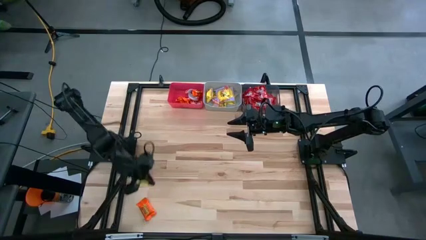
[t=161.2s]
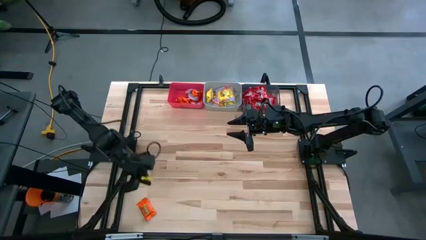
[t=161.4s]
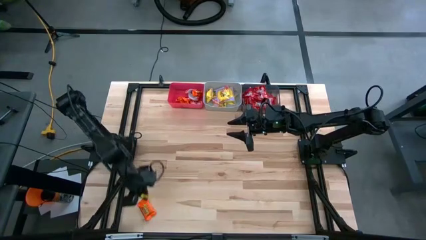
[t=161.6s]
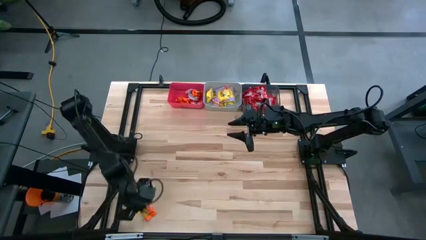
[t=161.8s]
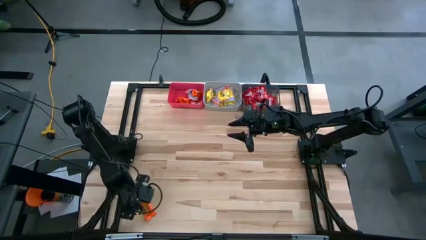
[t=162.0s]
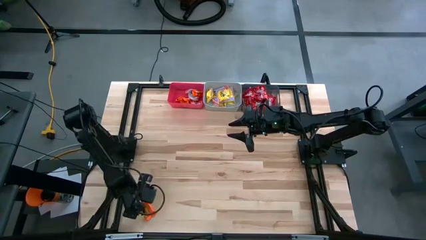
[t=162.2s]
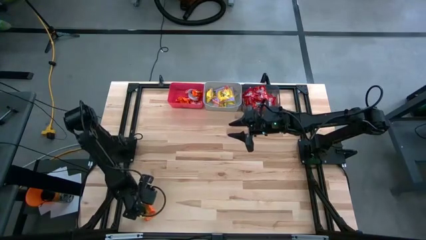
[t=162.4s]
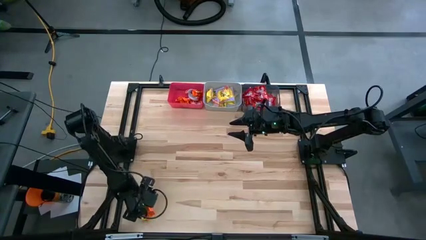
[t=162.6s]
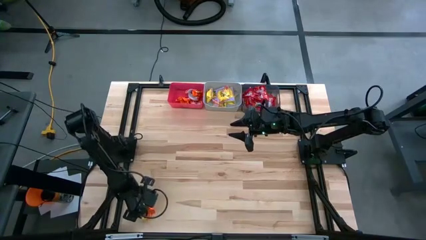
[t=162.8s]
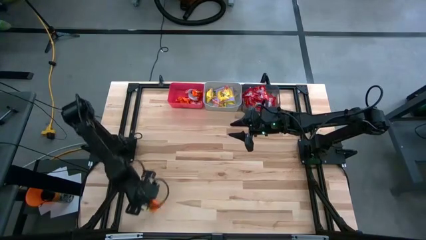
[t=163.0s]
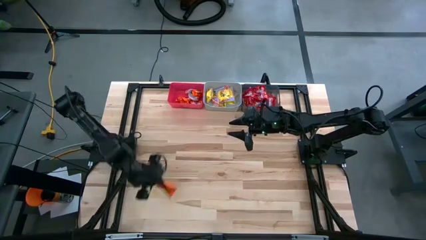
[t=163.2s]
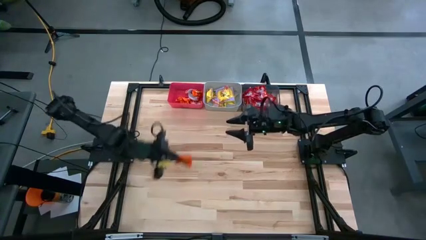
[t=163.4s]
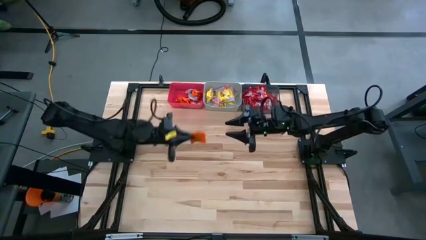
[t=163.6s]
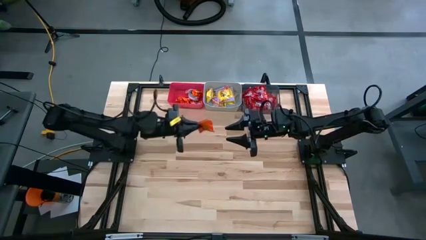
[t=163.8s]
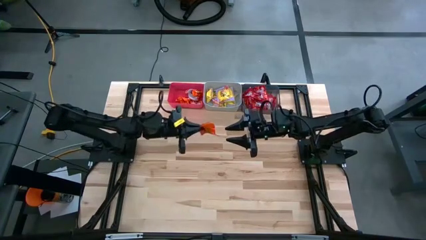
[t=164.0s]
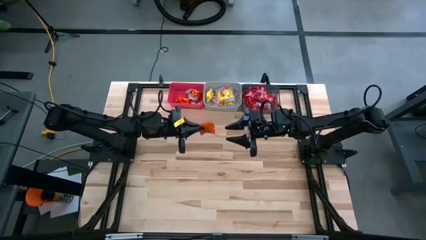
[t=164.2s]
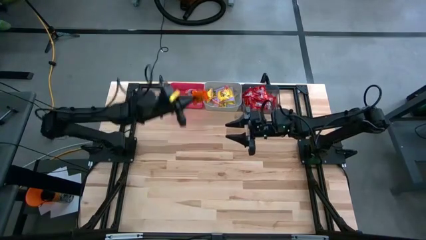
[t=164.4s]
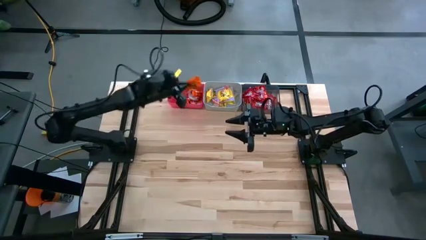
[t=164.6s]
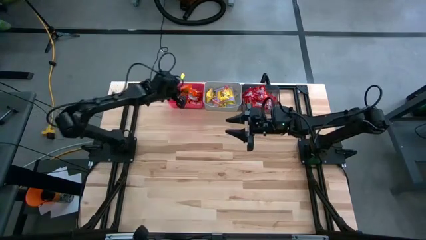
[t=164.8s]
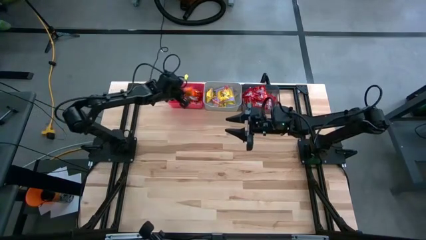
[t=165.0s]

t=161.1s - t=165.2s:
Task: Sort candy
Put the orange candy into the red bin

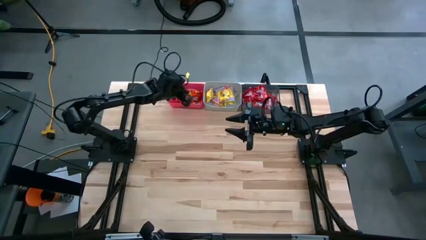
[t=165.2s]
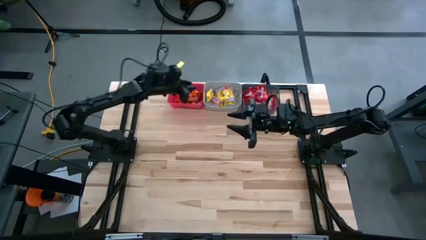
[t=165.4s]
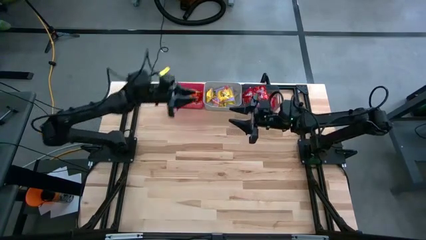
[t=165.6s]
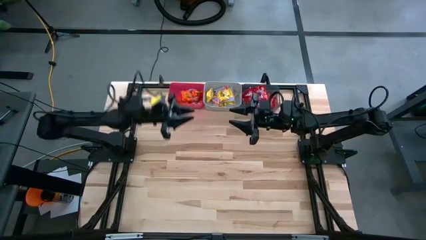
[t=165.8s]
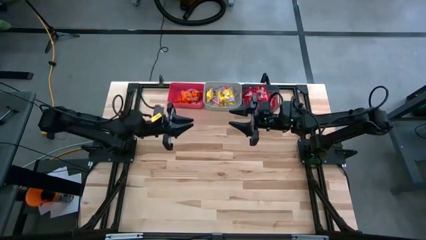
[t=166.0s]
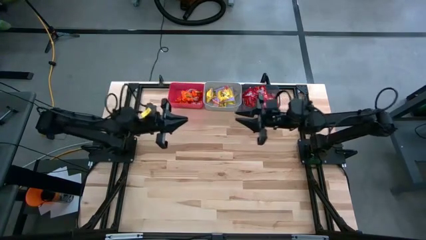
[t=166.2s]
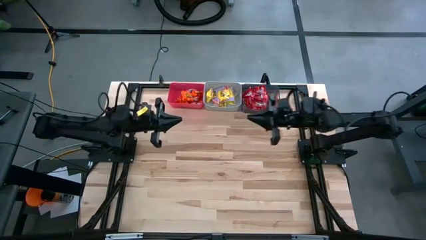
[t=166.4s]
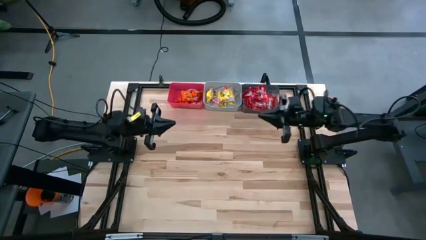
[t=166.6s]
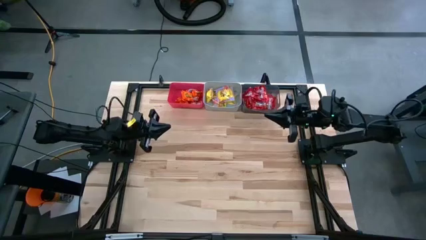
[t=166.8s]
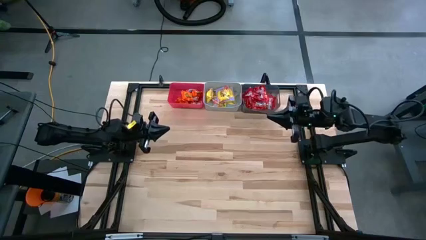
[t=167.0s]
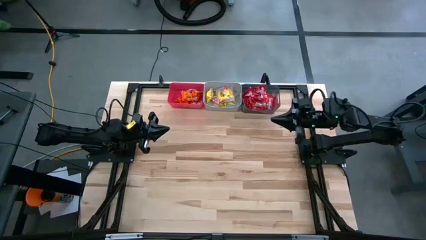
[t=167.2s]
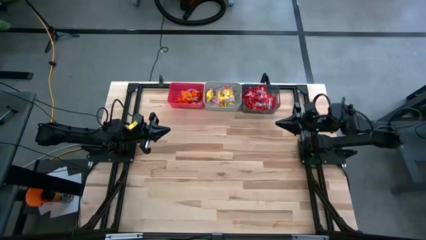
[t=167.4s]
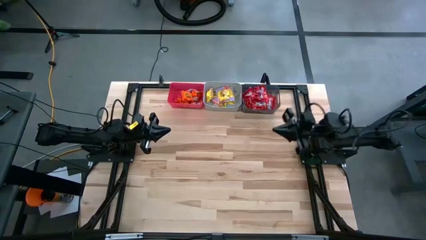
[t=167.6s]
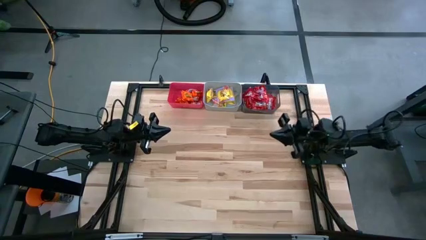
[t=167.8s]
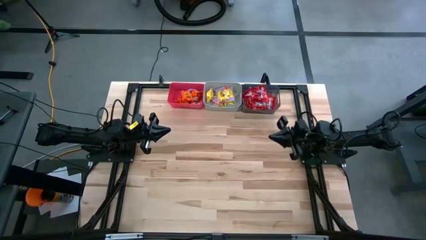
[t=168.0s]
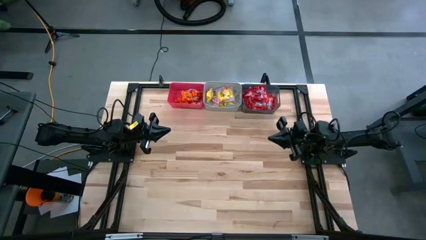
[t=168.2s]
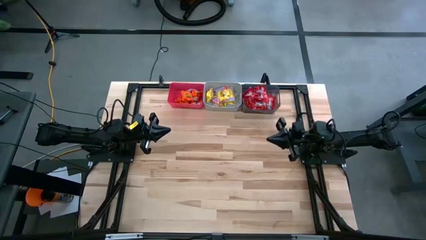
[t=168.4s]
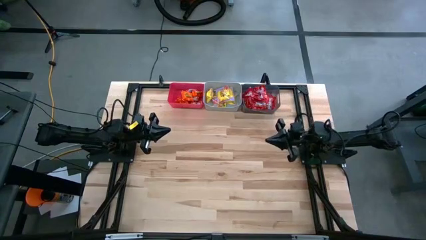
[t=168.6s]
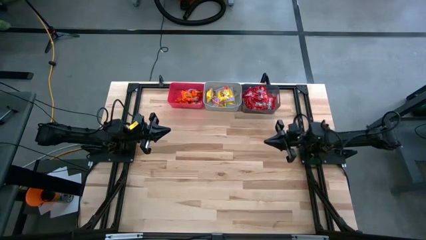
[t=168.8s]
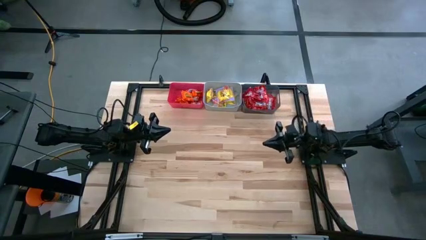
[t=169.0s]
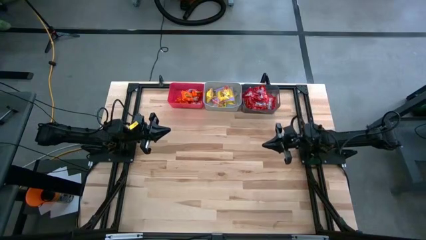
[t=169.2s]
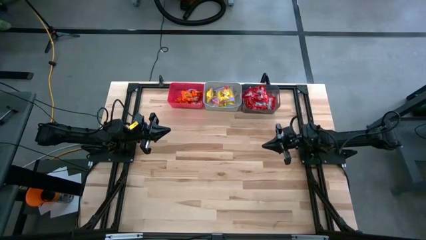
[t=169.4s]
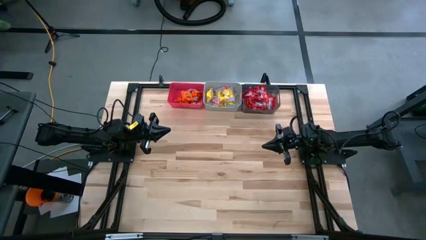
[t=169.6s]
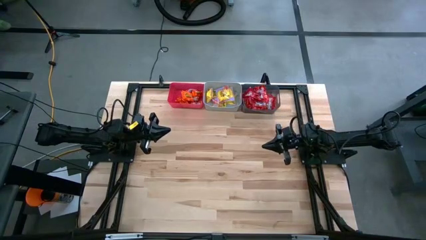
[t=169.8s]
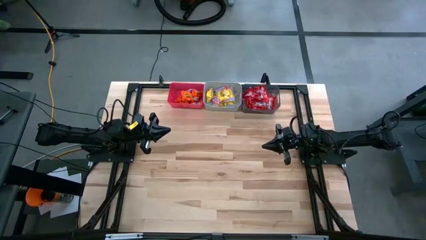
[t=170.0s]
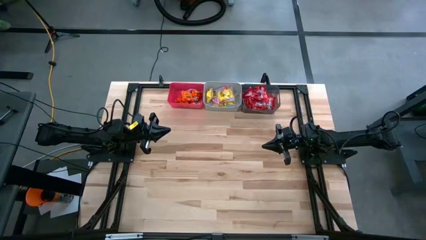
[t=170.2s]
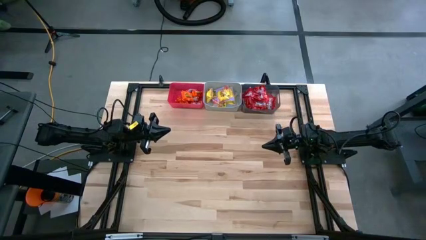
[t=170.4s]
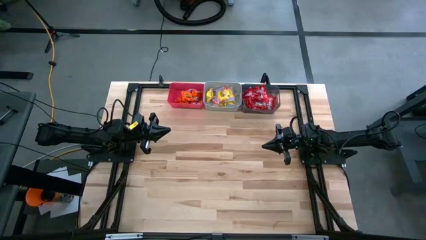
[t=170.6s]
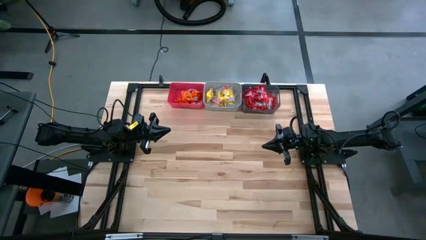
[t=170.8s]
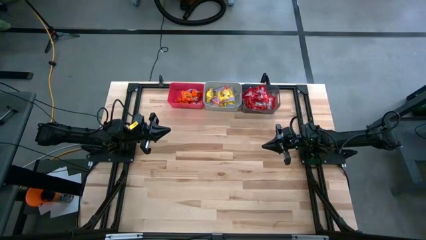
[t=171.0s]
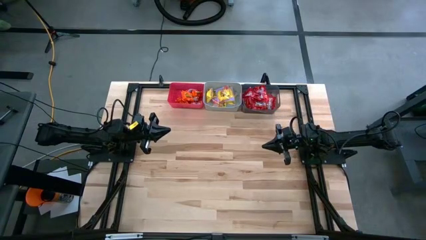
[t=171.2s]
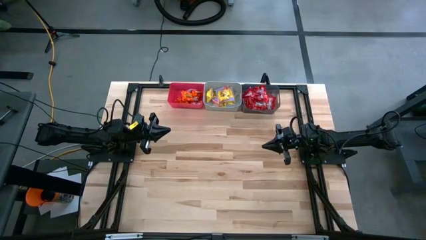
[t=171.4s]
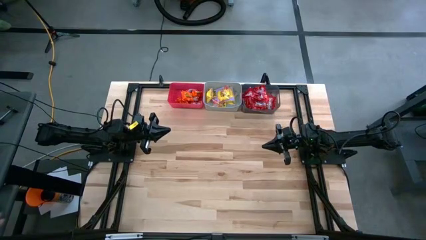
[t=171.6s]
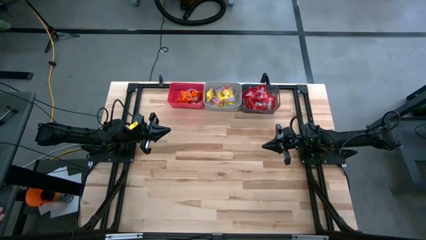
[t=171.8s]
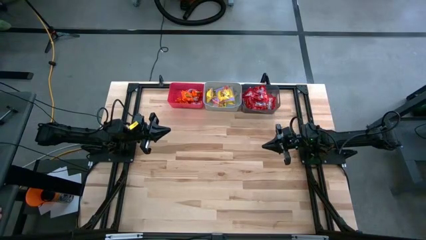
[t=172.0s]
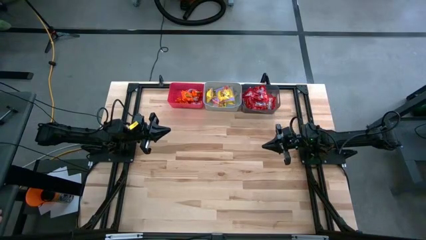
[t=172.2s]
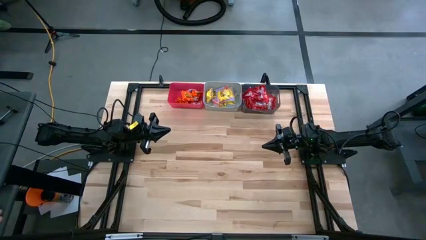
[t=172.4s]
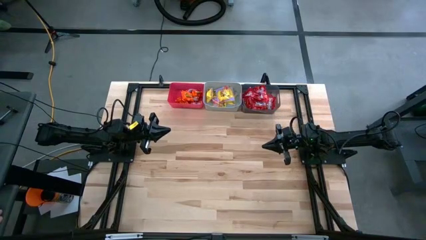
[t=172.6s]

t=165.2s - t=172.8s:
Return to Home Position

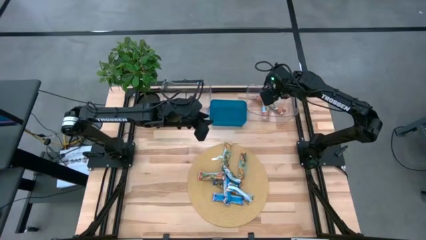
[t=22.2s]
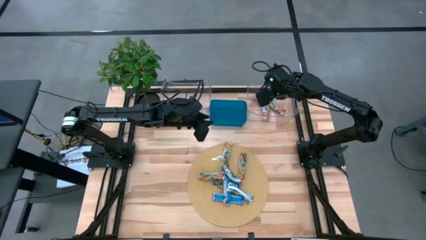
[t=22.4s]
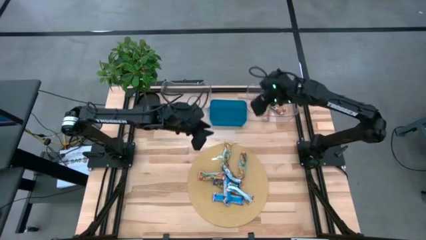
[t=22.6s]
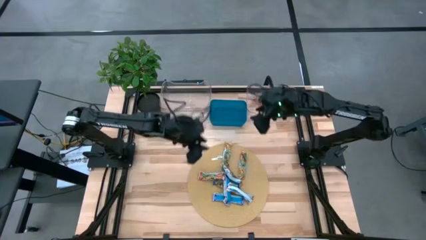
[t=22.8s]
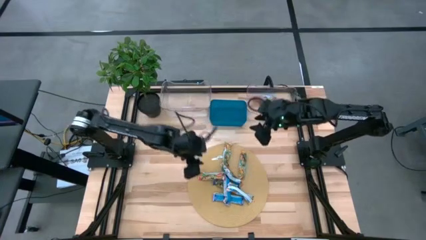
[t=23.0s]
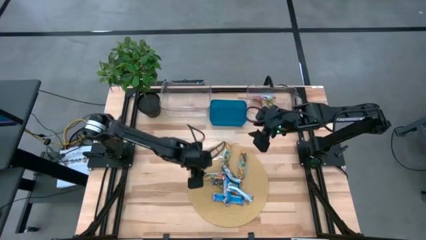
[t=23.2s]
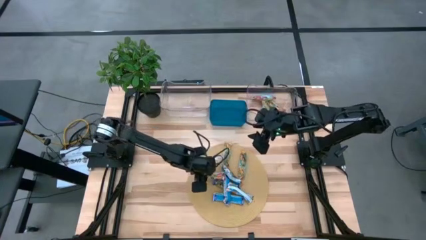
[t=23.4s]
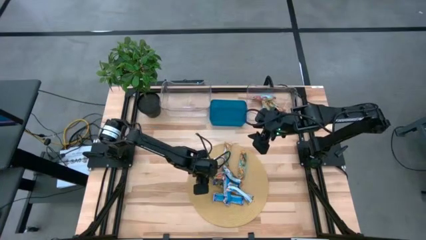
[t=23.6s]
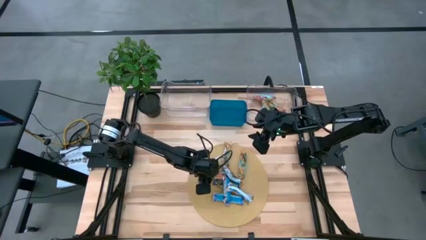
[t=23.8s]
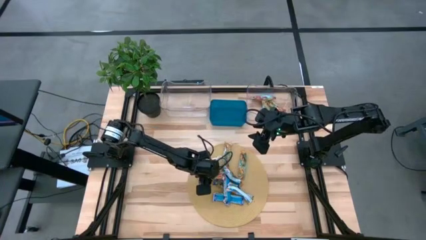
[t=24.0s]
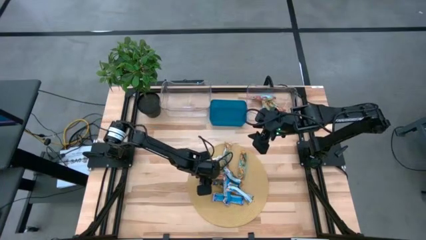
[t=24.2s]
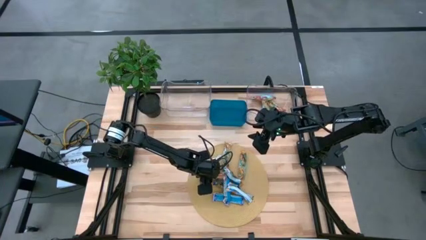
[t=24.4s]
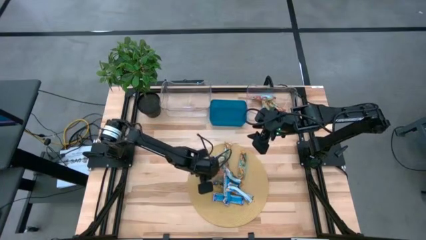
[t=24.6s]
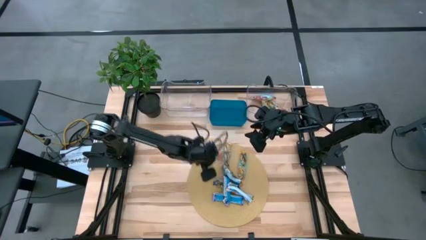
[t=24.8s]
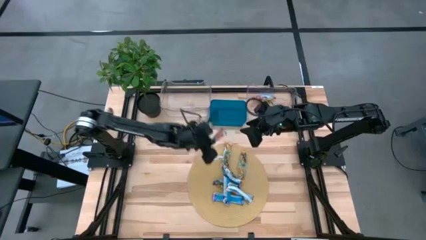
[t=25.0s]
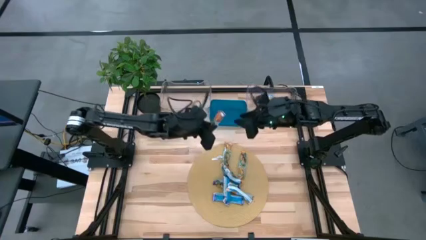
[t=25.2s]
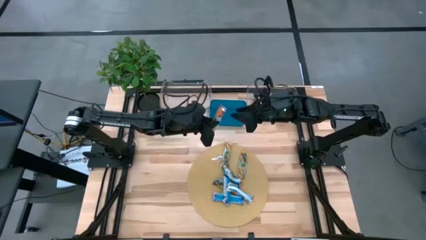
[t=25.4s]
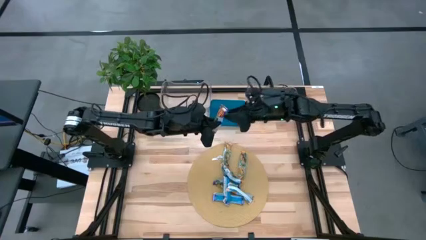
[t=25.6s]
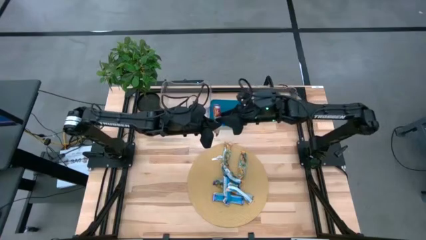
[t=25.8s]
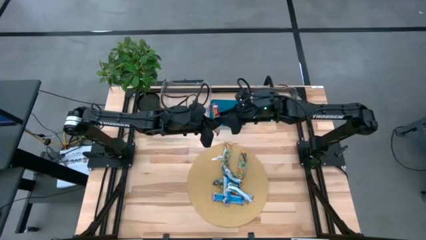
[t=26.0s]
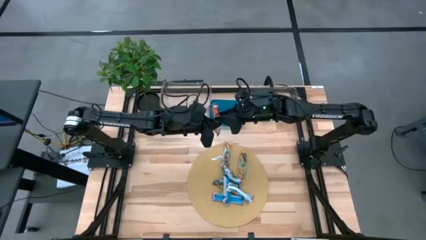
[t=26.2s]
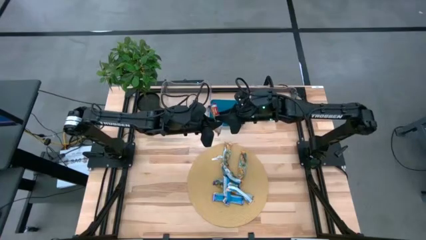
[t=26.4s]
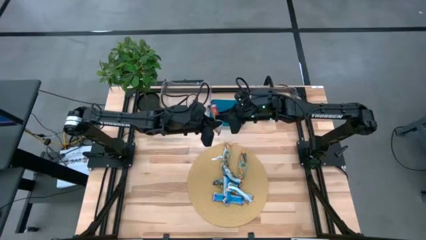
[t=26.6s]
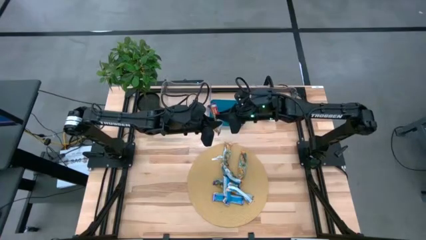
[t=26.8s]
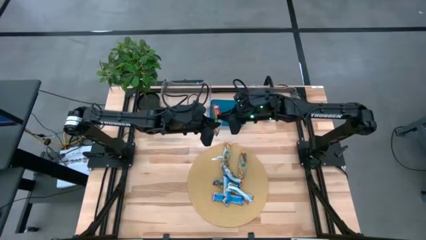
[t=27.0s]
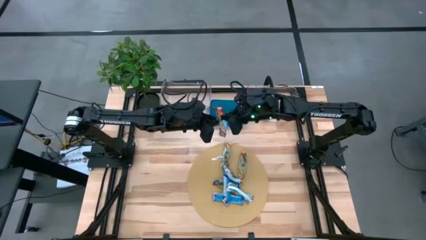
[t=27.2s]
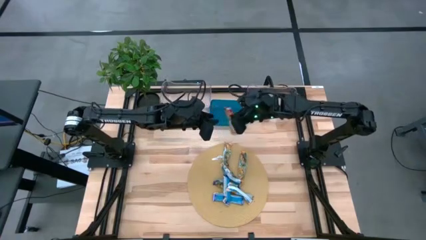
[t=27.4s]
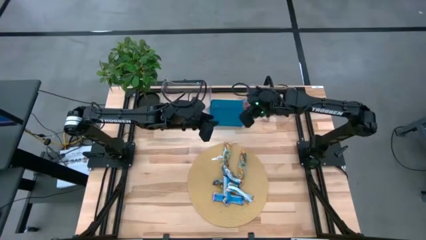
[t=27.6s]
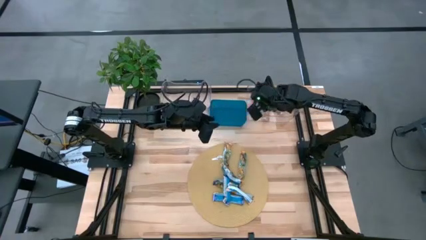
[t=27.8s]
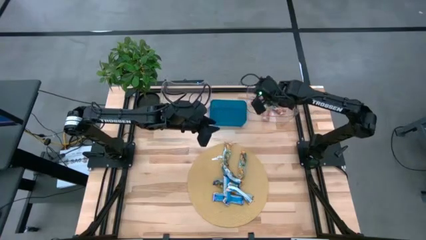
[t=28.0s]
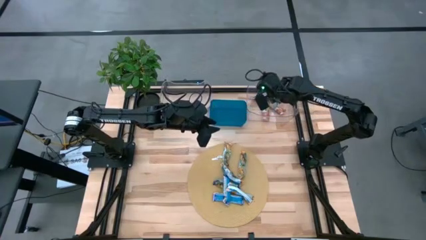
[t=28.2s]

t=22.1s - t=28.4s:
Task: Pick and place Granola Bars by type
Put the red granola bar into the right transparent bin
